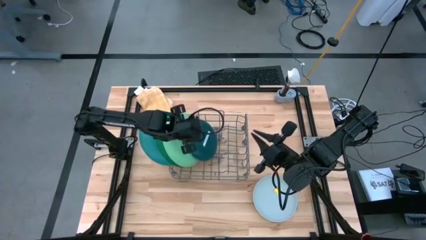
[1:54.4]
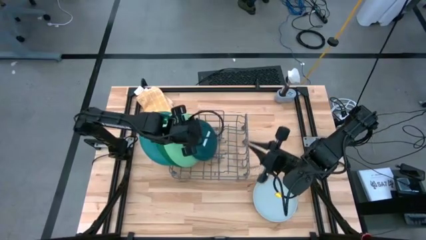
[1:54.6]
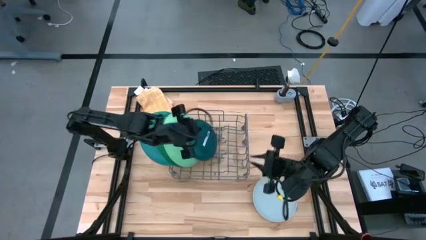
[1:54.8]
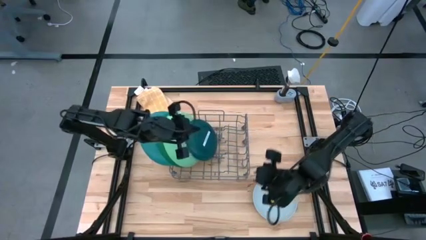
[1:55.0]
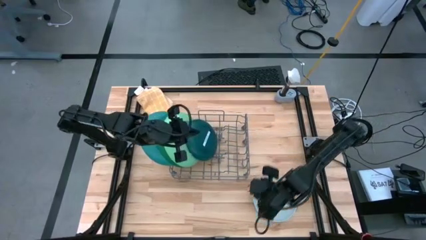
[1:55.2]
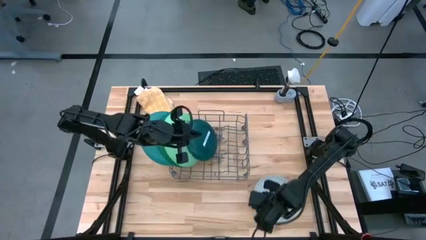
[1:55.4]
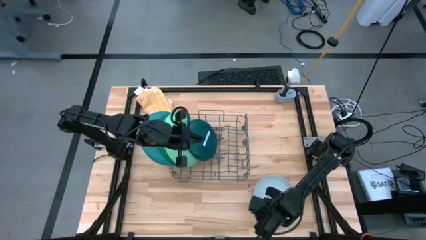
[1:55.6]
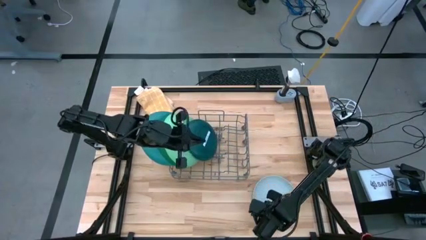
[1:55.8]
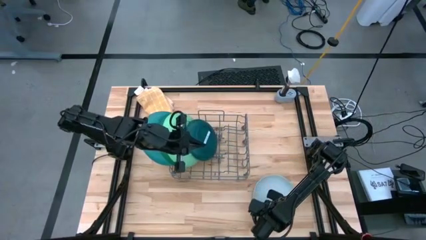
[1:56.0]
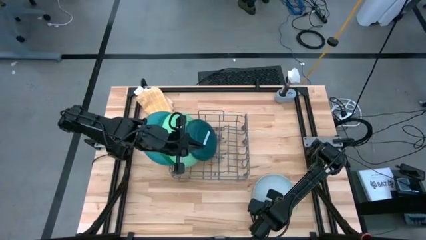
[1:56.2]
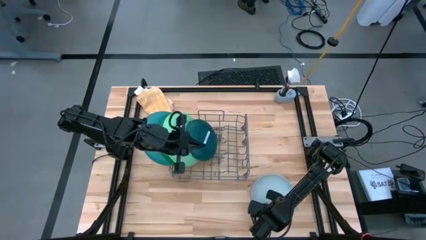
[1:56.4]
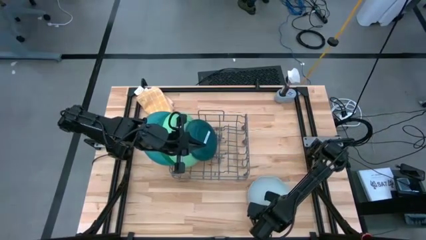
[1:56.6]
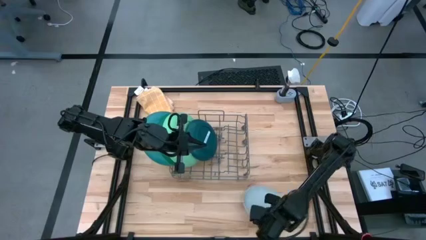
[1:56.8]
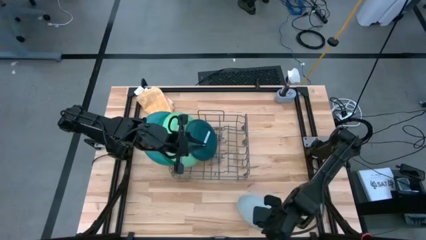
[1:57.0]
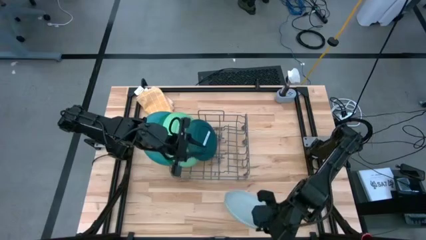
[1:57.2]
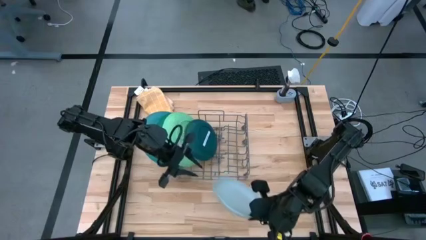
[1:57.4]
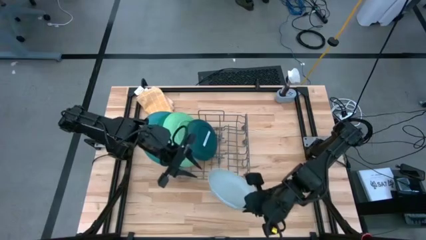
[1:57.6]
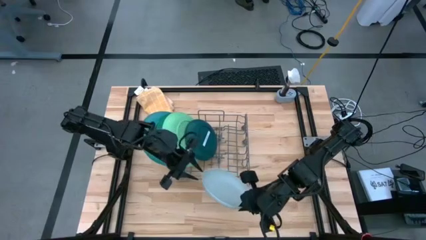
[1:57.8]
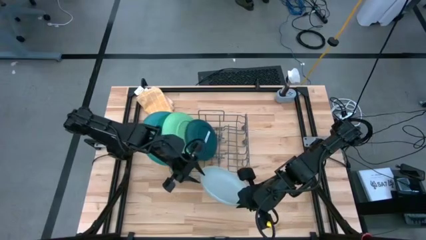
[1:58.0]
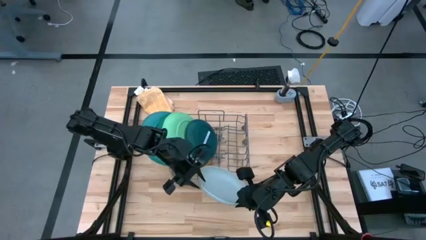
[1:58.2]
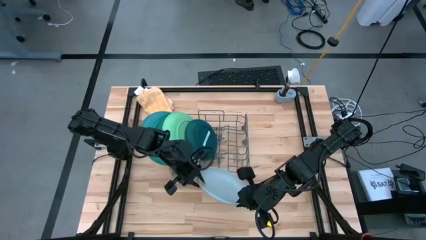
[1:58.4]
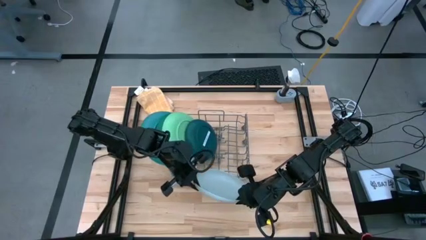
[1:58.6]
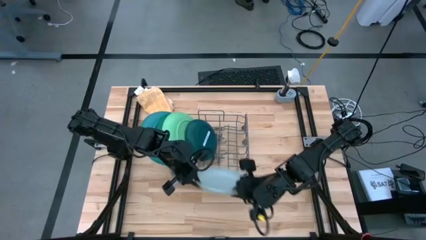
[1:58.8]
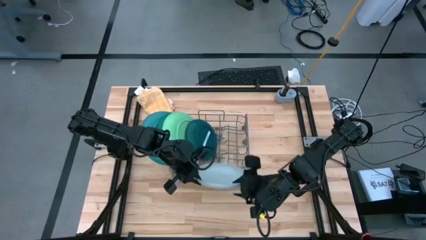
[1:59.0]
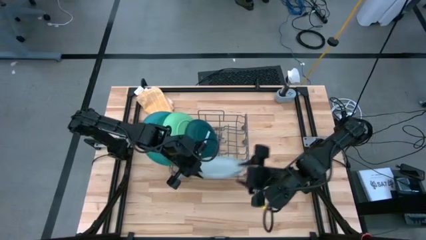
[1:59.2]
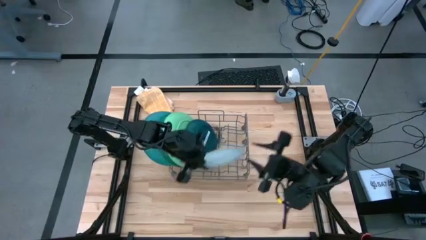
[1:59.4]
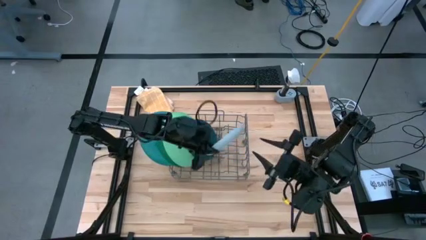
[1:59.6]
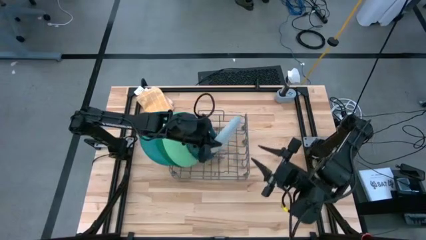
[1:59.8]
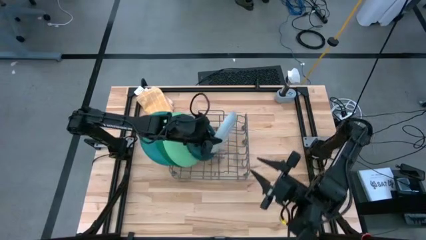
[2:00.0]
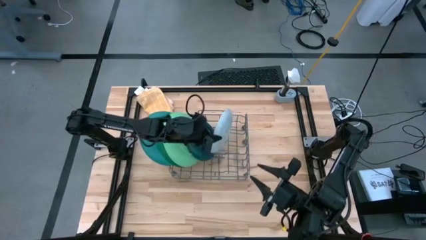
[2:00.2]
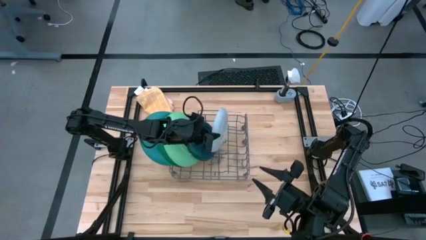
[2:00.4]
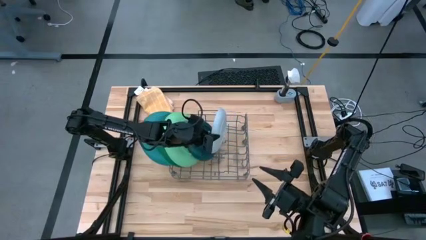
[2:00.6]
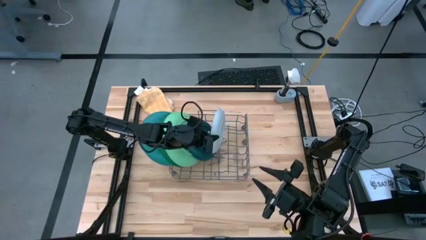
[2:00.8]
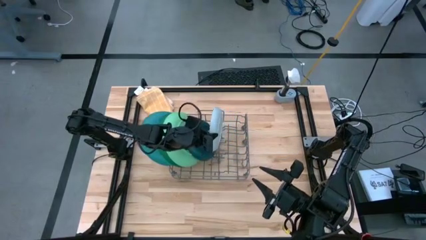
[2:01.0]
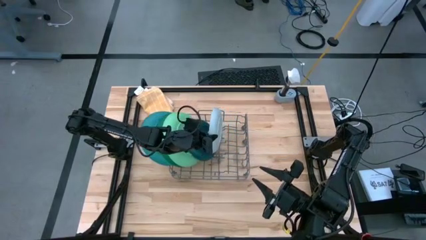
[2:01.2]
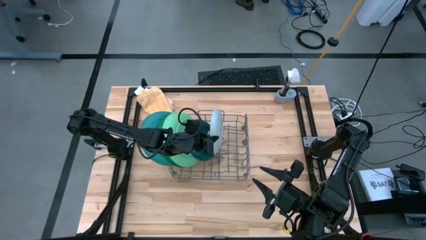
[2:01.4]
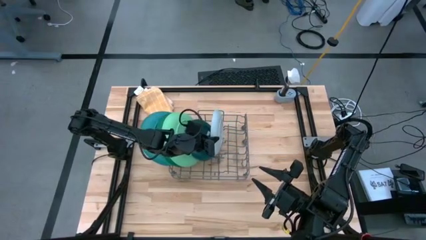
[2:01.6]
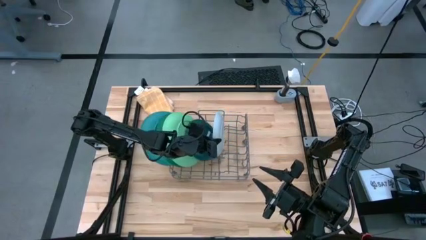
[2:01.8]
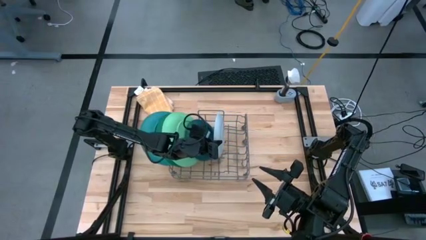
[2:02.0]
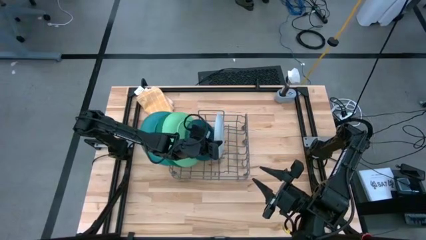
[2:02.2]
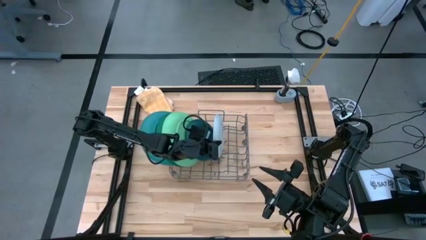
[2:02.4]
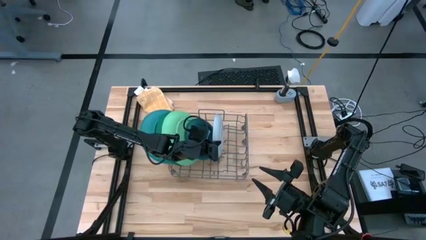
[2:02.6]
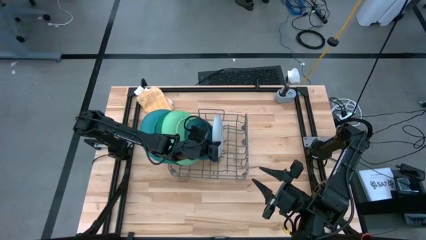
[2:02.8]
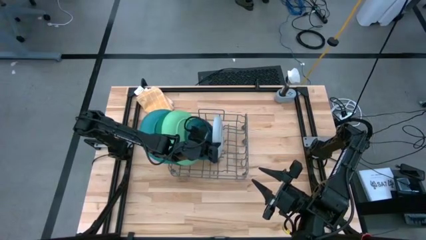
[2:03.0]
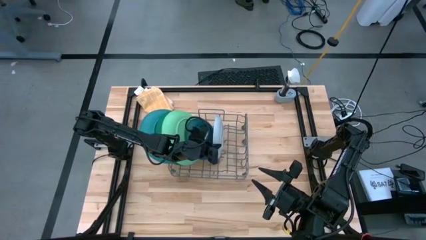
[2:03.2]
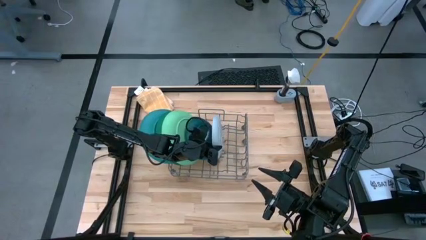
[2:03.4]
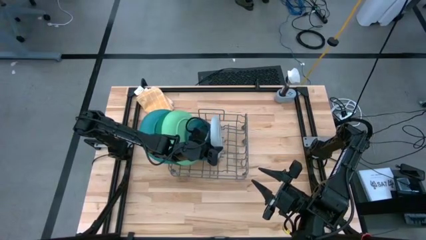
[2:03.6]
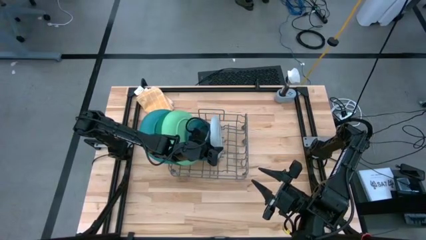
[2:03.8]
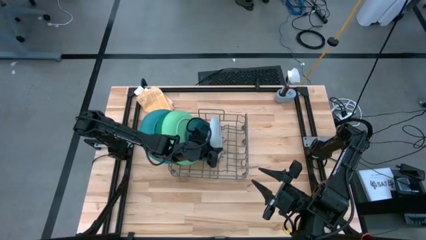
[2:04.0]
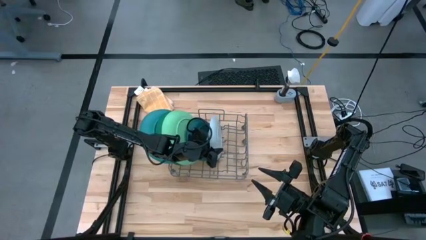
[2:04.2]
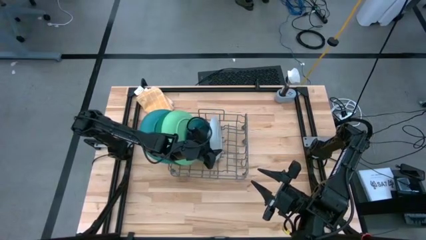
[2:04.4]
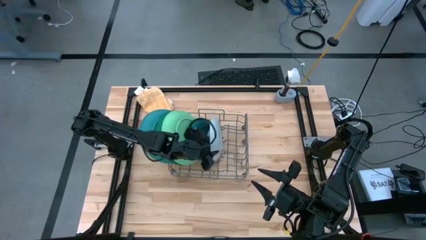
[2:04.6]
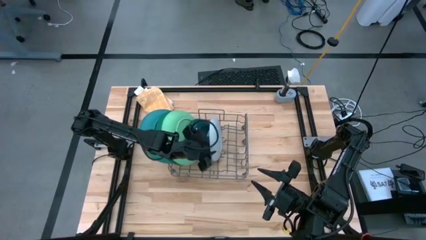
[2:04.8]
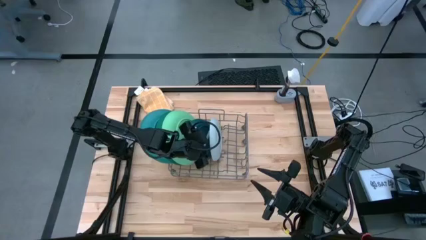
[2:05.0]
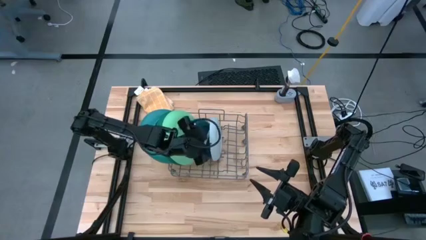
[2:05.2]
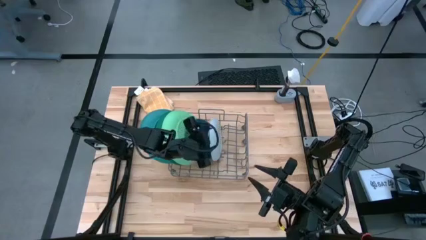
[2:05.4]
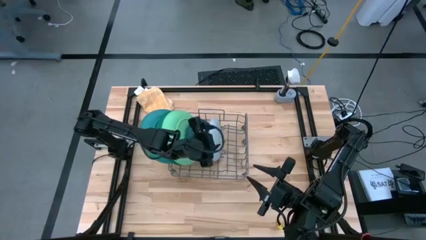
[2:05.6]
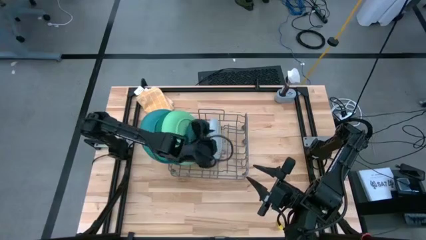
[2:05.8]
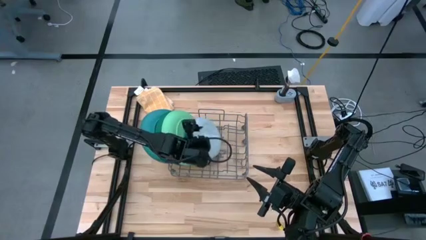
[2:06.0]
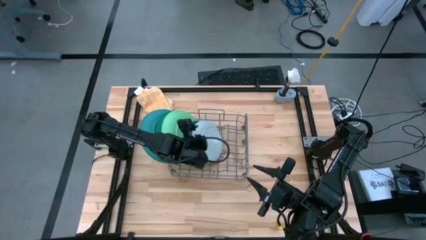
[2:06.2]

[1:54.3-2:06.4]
Task: Sort dishes
Put the light blue plate into the dishwasher rack
